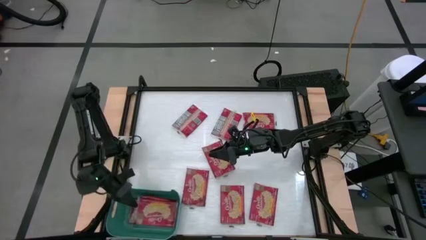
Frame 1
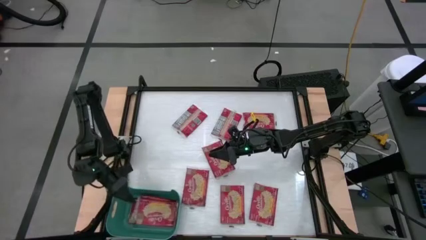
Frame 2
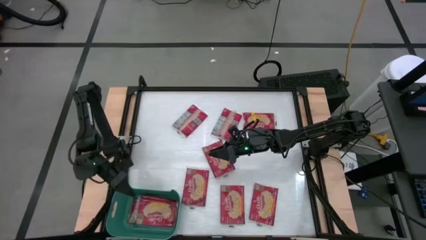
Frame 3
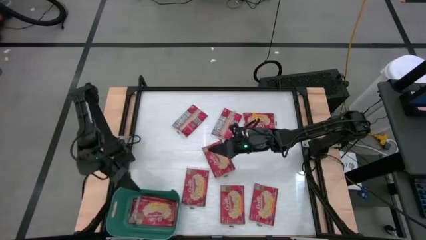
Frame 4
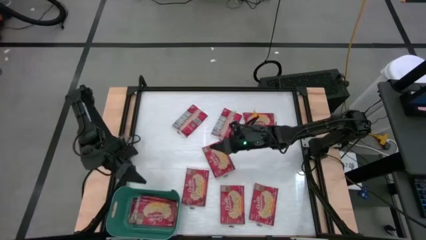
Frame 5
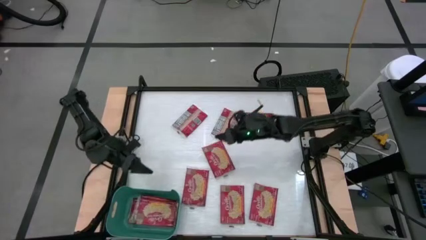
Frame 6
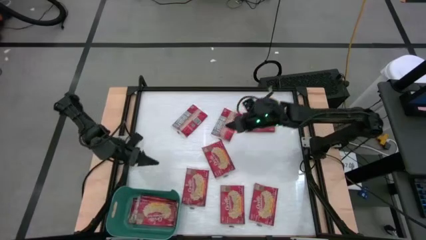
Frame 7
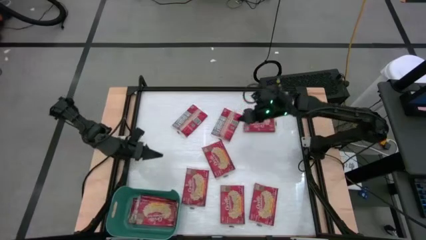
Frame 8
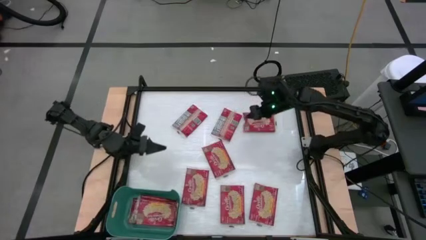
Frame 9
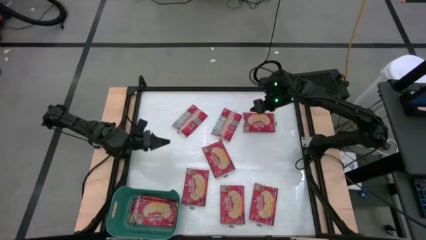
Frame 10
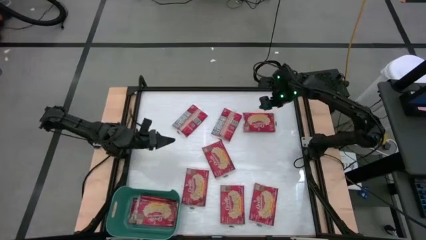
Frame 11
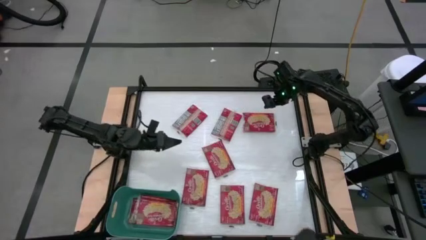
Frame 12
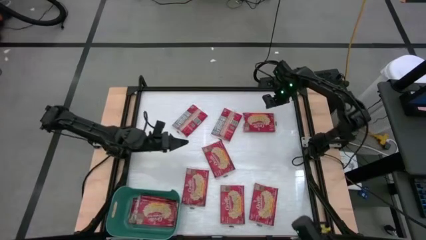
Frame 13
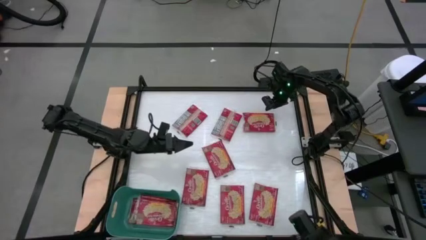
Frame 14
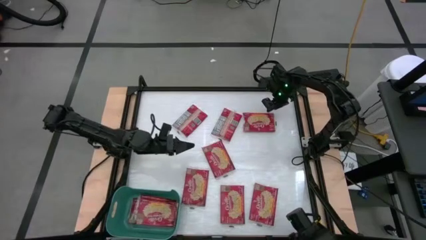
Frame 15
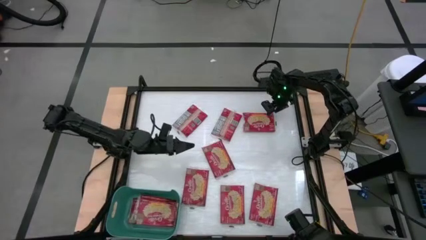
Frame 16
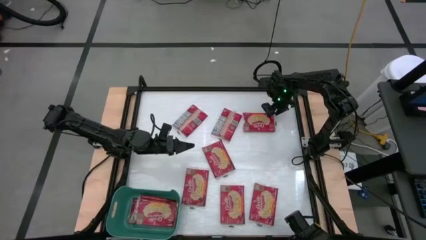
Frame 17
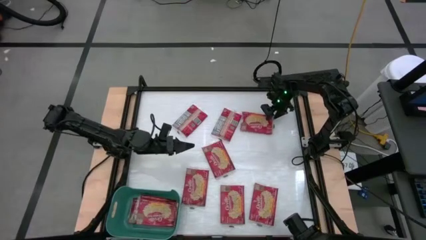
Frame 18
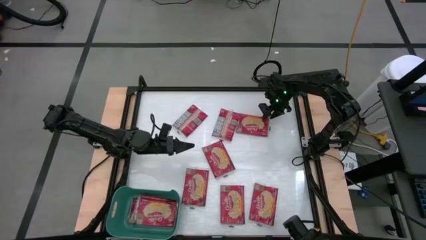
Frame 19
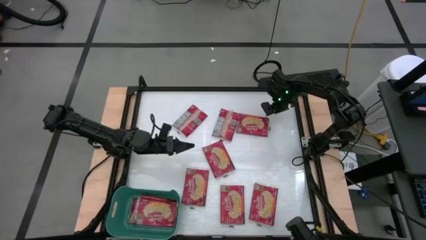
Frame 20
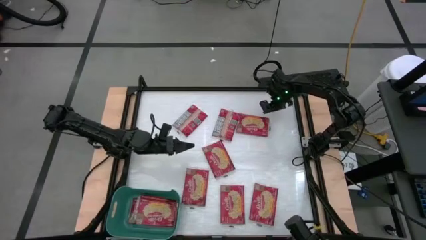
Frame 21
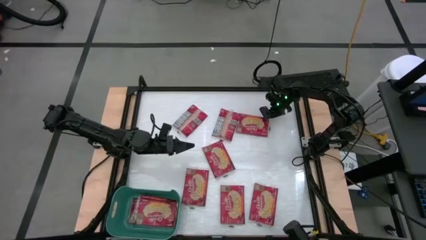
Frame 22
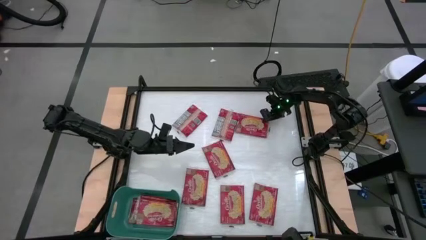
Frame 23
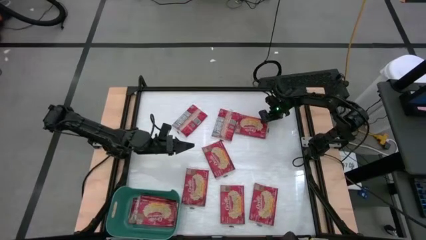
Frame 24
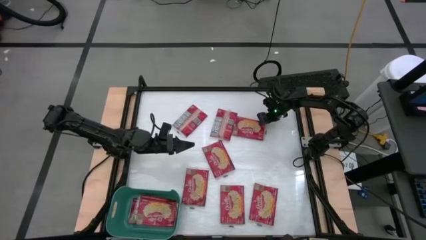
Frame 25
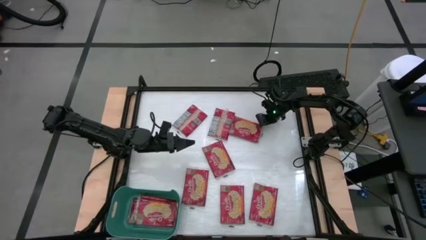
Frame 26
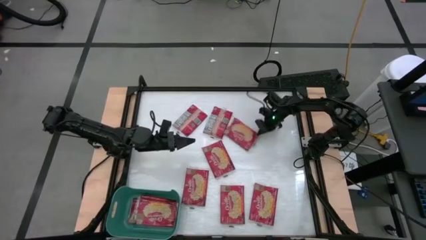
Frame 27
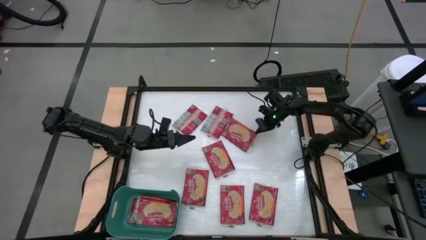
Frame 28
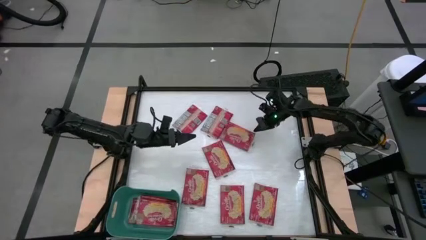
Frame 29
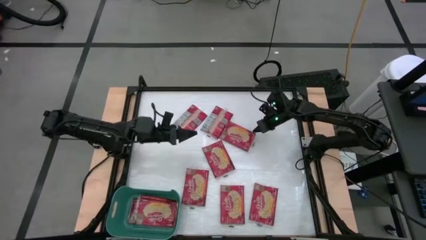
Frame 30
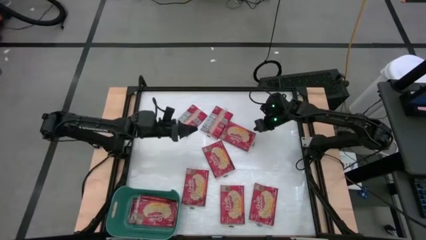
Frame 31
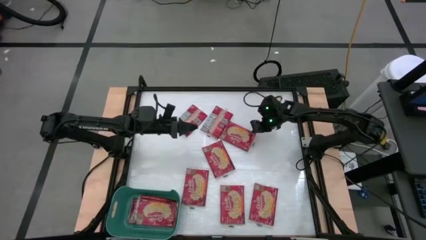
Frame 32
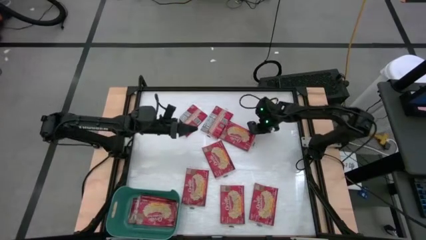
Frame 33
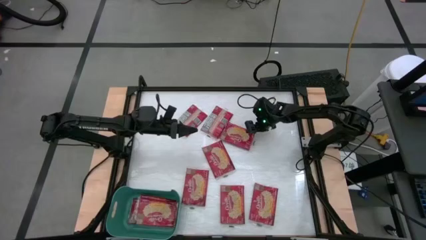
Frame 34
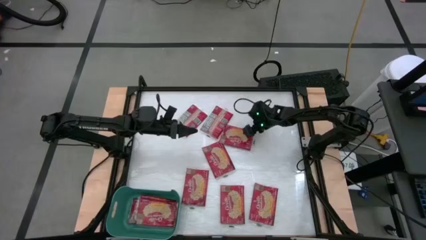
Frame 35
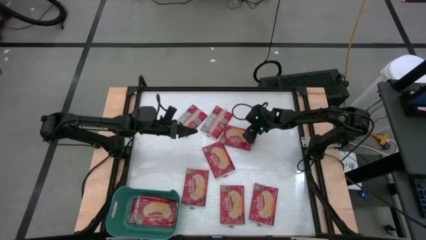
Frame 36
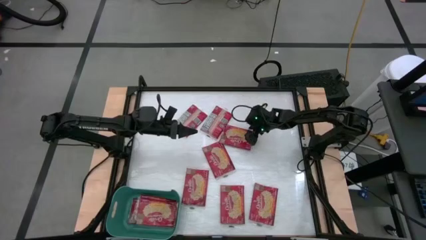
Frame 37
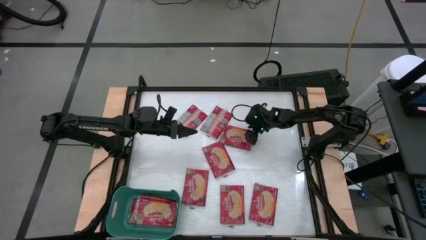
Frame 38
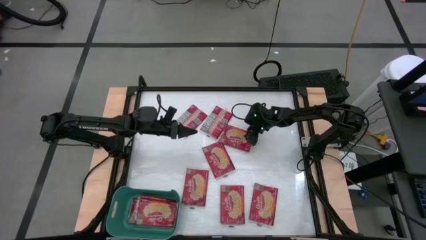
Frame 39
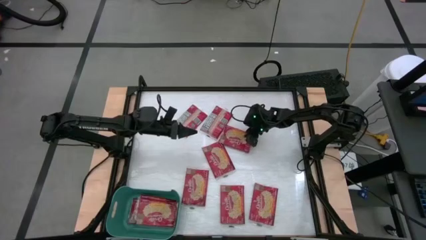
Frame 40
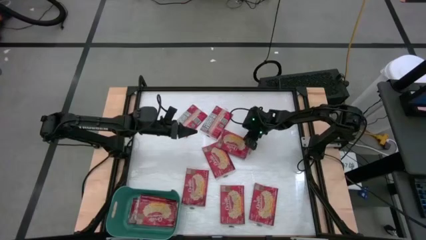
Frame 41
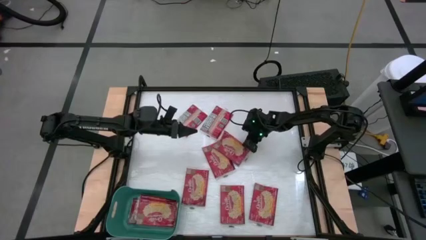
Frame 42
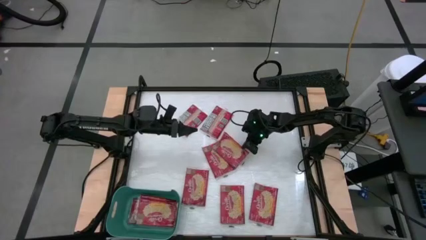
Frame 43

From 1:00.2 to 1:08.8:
Task: Sort popcorn bags into baskets
Put the red popcorn bag into the green bin

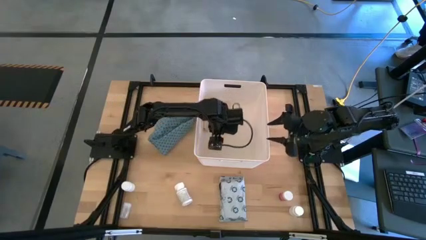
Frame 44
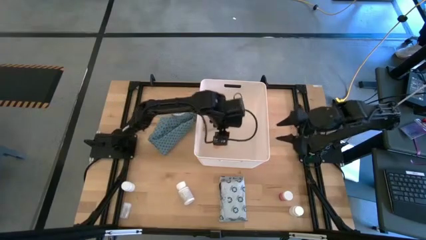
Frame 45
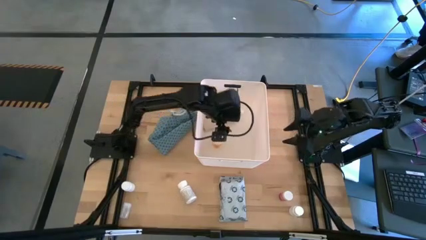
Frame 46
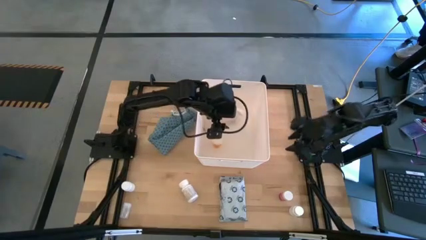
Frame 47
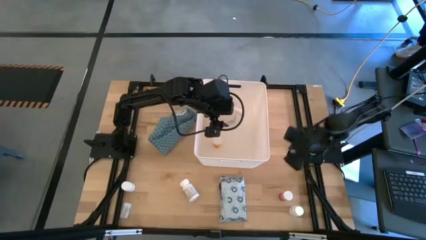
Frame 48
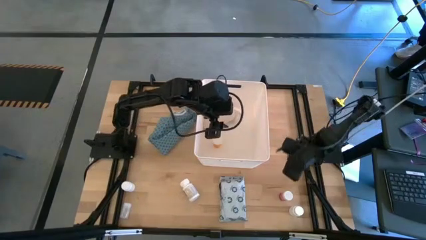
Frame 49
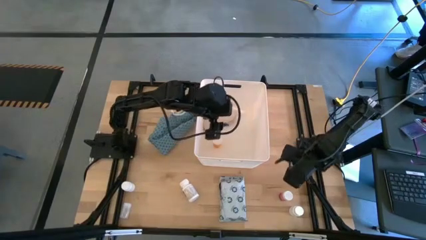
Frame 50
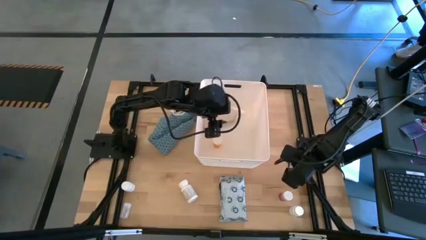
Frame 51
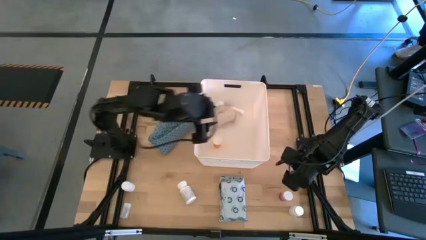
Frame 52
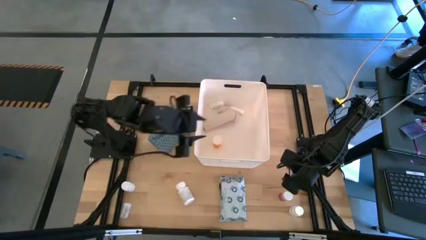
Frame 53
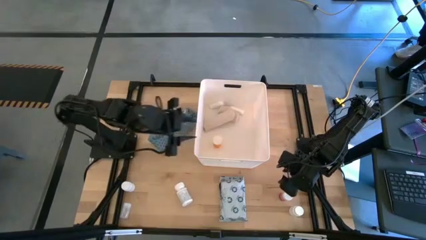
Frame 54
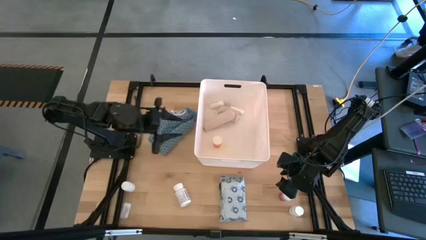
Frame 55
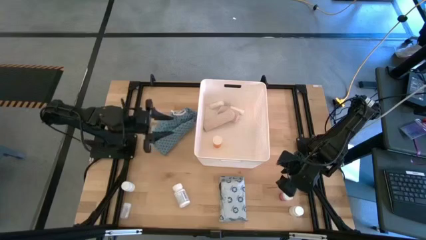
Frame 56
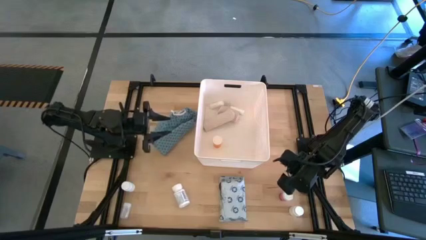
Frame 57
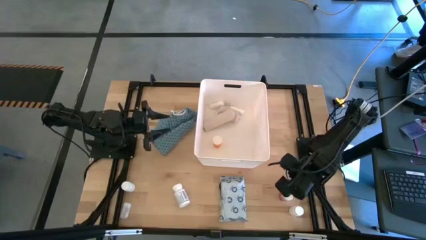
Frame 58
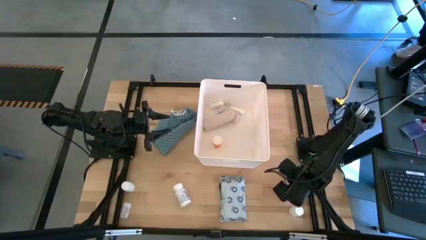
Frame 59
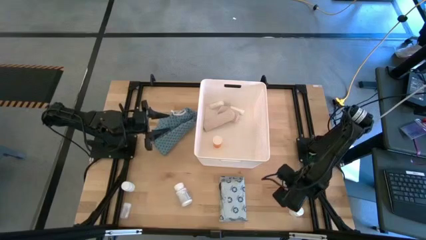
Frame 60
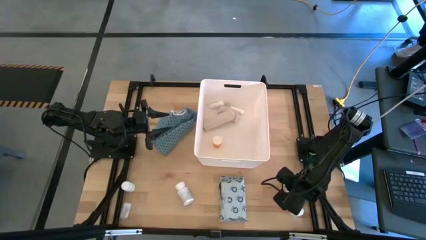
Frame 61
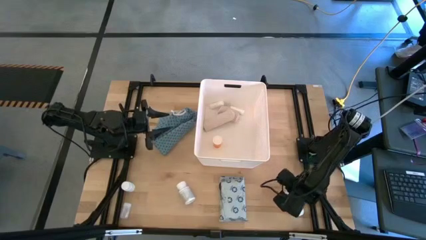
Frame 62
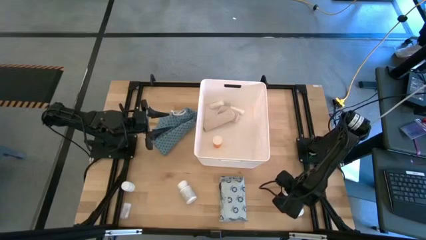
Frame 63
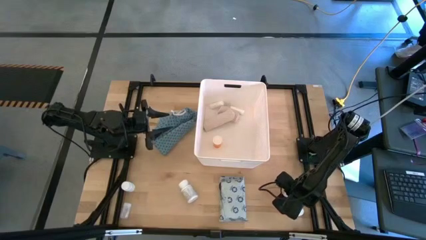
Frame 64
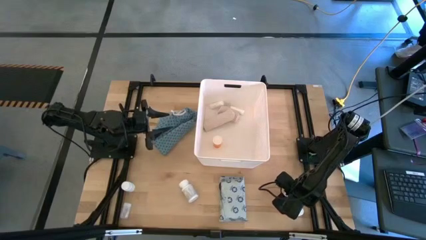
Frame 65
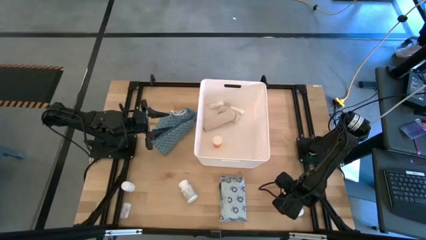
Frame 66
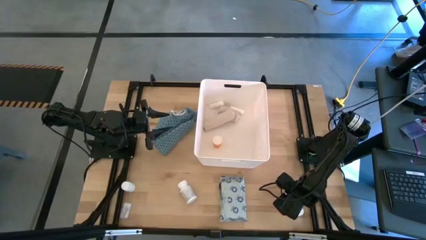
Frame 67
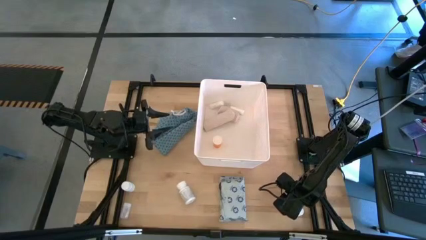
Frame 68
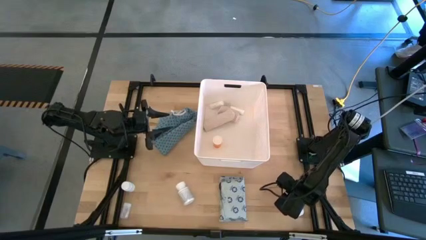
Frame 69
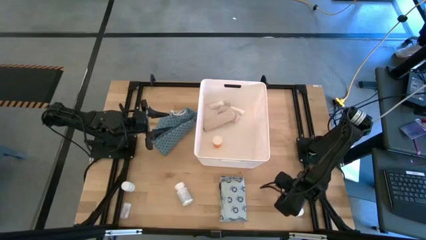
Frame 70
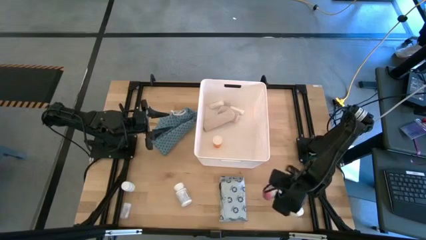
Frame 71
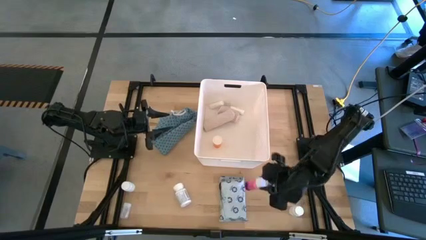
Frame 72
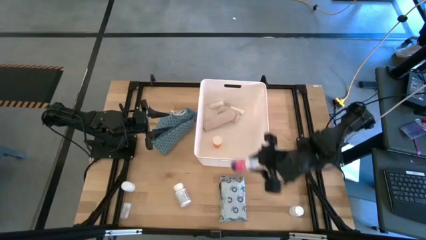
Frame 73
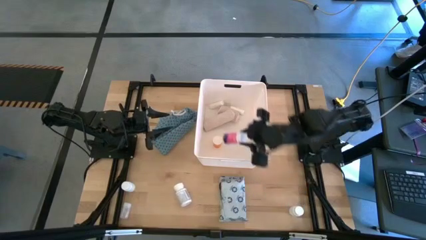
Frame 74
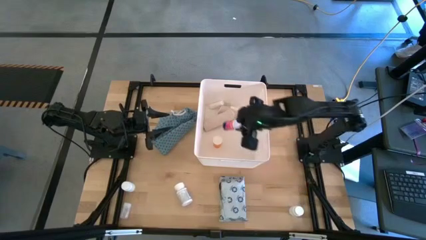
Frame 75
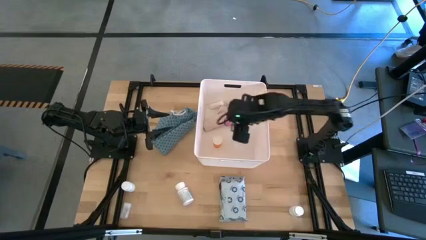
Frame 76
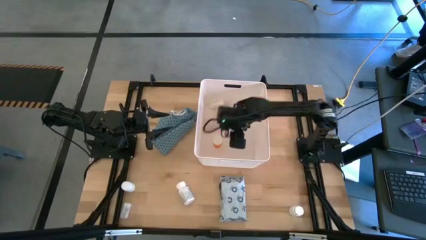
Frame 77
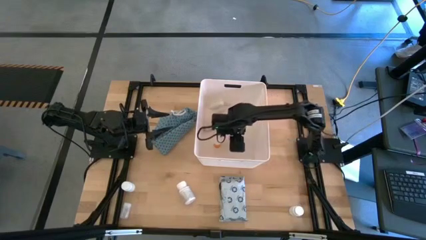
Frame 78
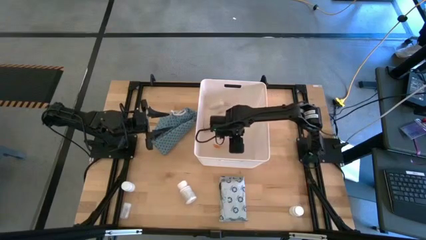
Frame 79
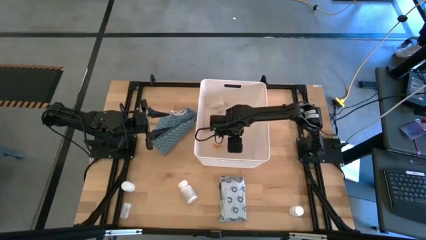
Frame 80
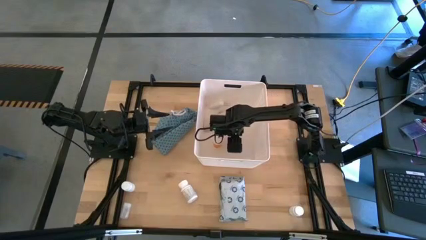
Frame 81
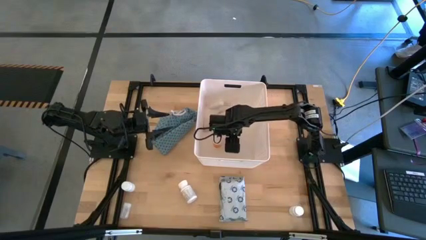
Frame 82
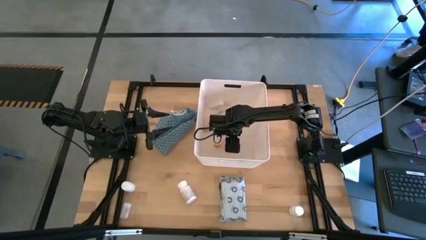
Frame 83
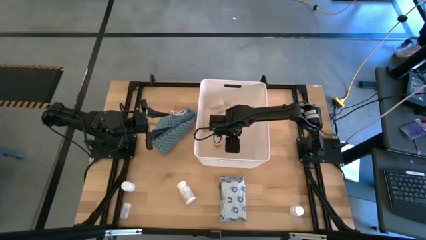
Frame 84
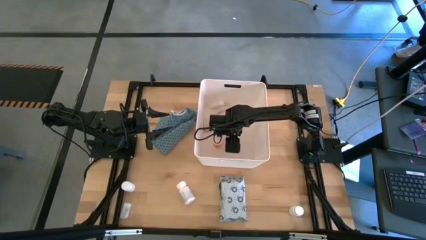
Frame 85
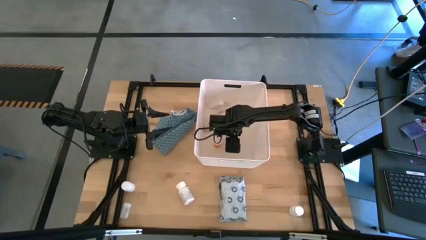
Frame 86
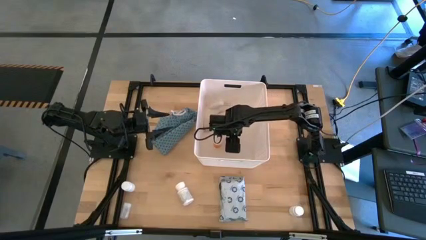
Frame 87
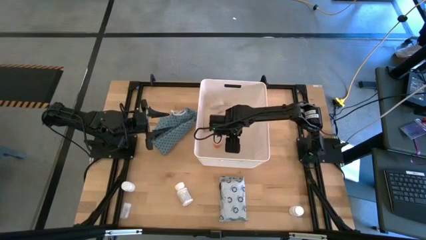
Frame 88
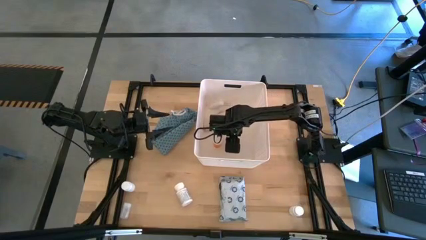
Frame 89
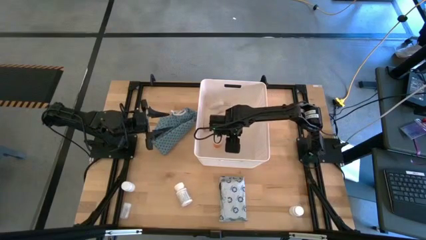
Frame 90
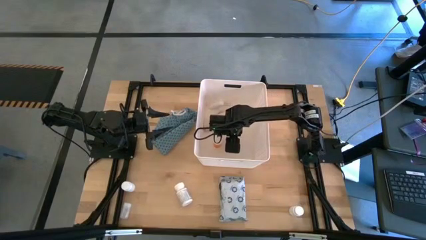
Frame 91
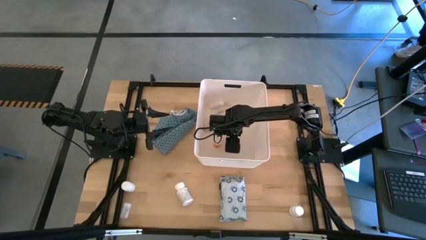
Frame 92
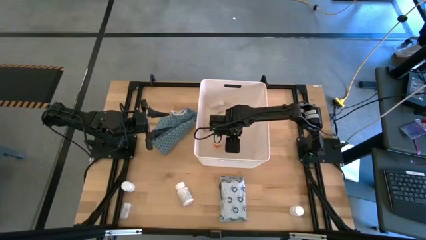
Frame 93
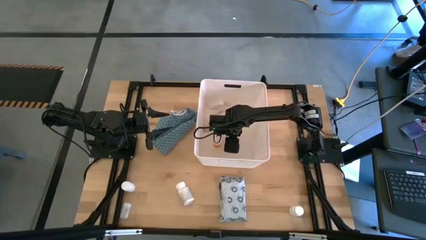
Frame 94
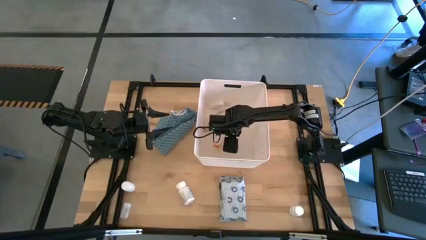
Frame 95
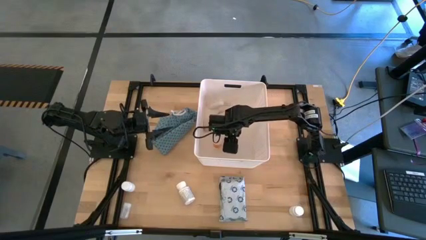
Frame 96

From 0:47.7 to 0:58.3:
Task: Pick & place medical supplies in basket/bin
Put the pink medicine bottle into the white bin
